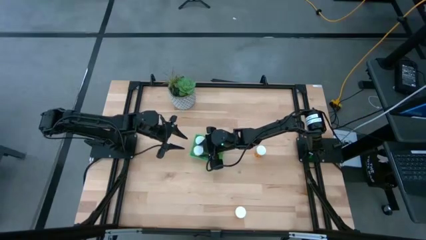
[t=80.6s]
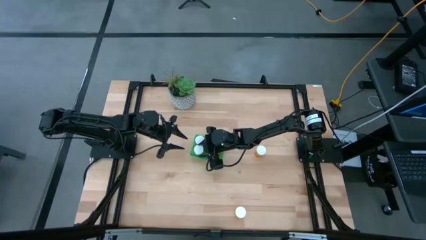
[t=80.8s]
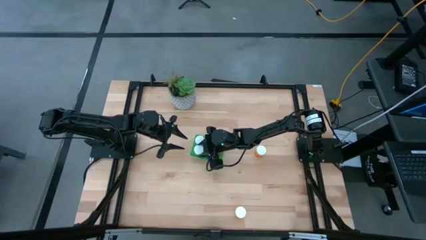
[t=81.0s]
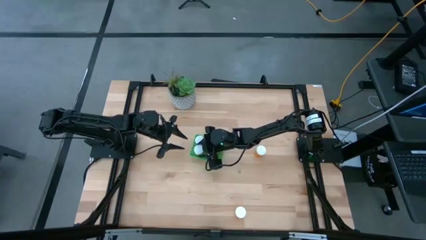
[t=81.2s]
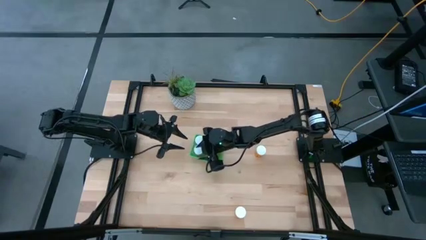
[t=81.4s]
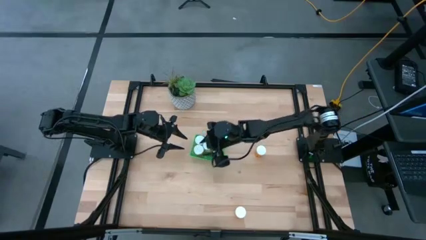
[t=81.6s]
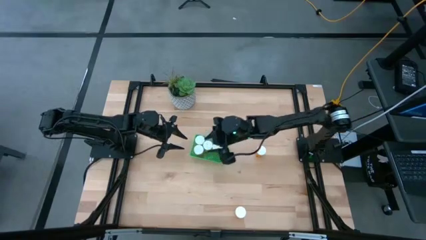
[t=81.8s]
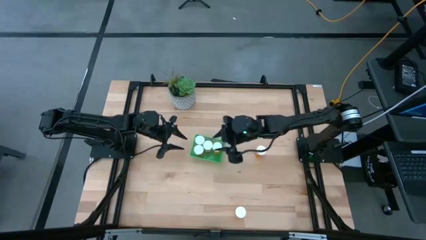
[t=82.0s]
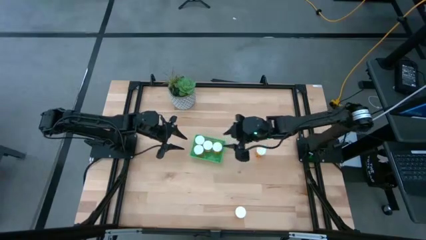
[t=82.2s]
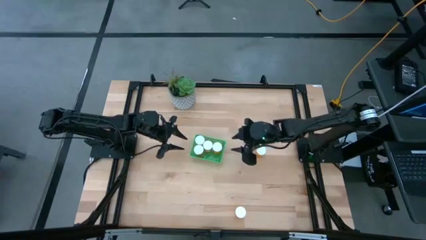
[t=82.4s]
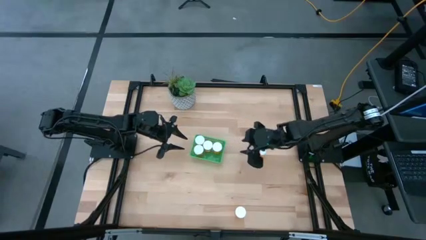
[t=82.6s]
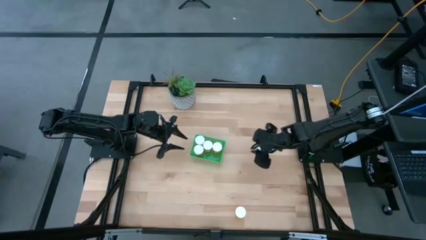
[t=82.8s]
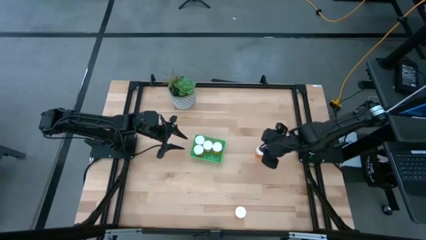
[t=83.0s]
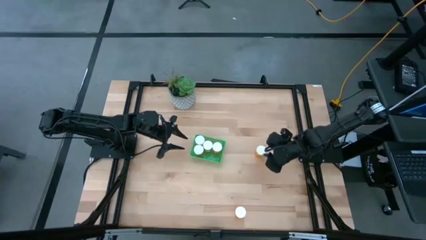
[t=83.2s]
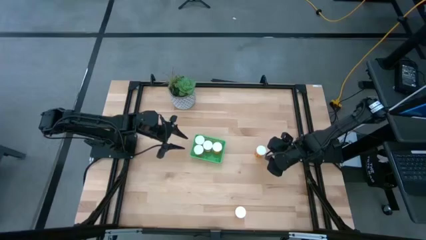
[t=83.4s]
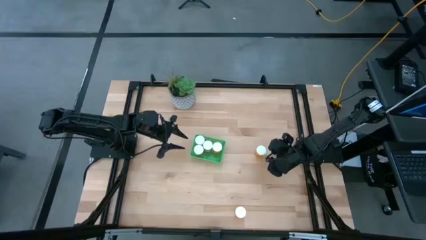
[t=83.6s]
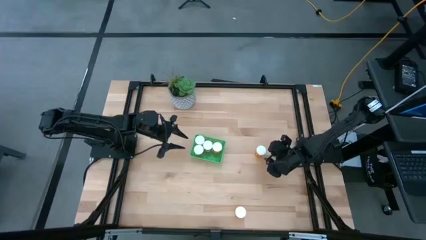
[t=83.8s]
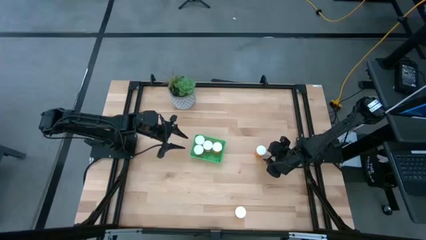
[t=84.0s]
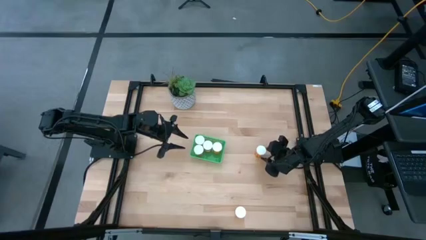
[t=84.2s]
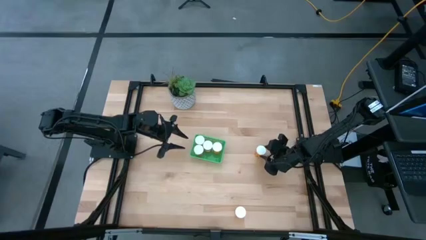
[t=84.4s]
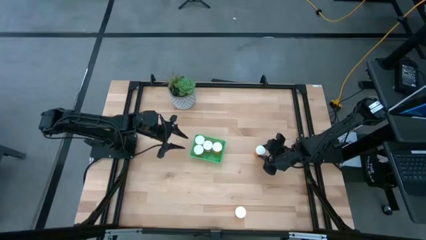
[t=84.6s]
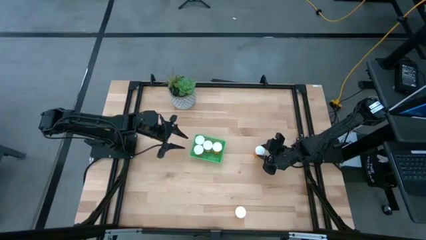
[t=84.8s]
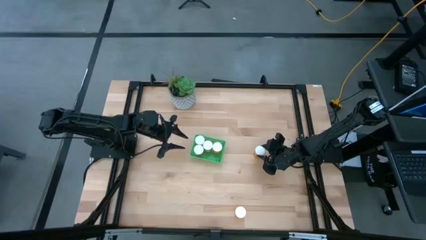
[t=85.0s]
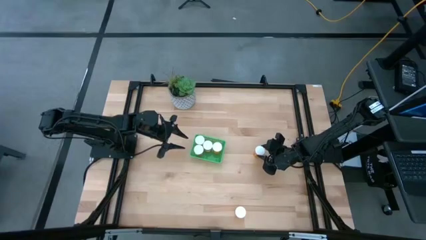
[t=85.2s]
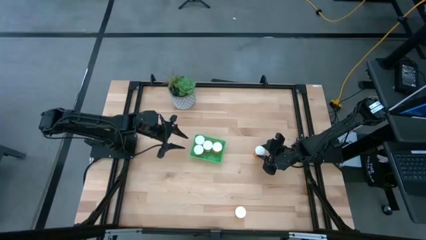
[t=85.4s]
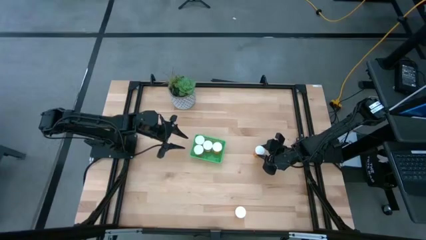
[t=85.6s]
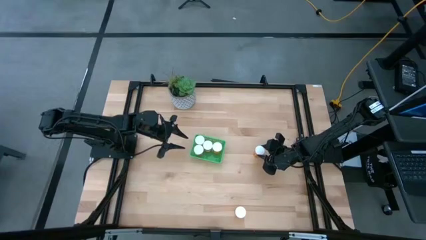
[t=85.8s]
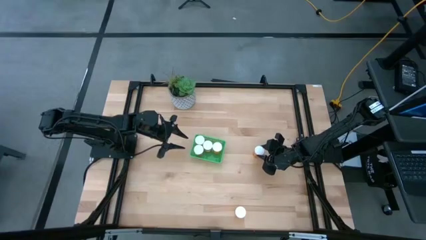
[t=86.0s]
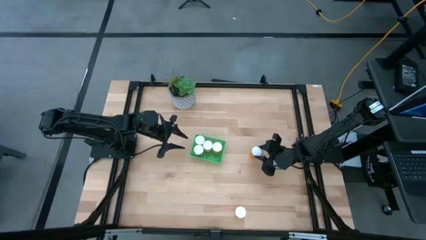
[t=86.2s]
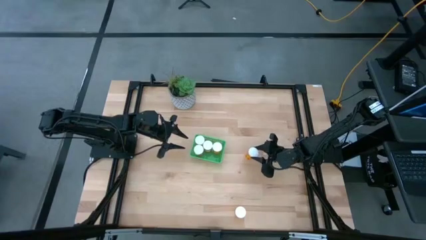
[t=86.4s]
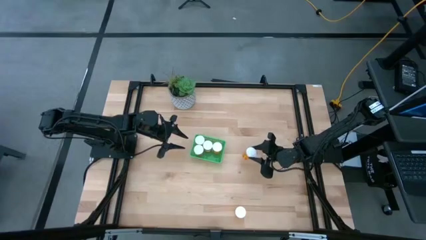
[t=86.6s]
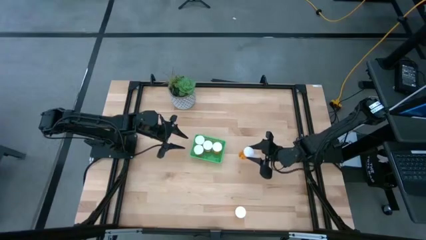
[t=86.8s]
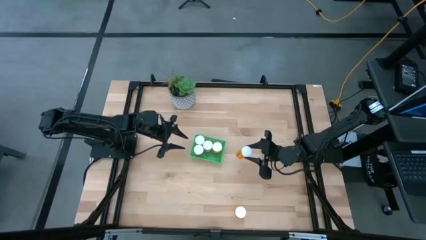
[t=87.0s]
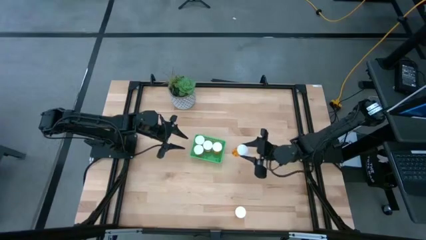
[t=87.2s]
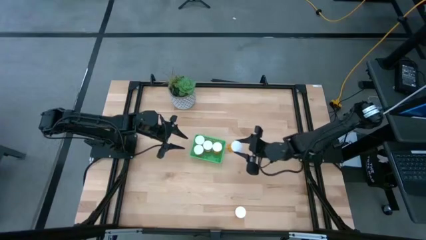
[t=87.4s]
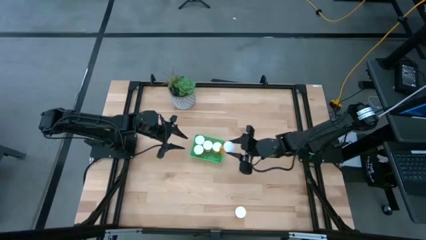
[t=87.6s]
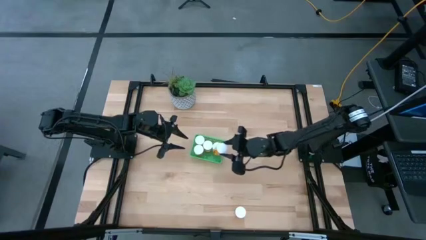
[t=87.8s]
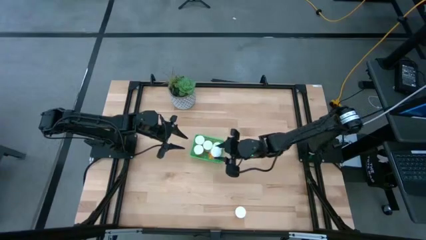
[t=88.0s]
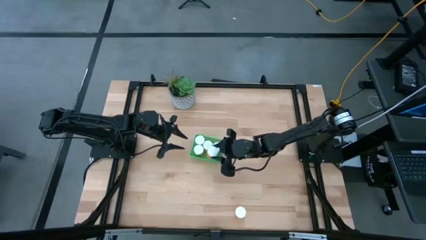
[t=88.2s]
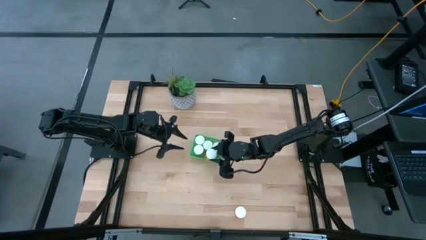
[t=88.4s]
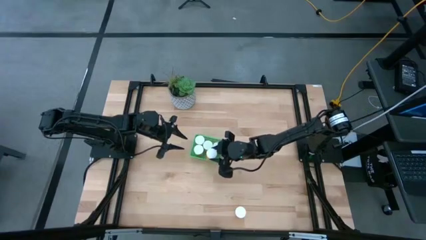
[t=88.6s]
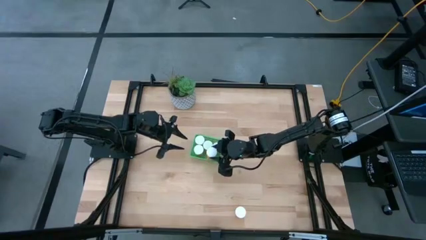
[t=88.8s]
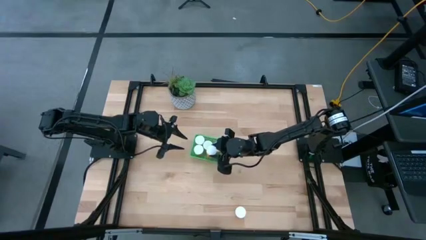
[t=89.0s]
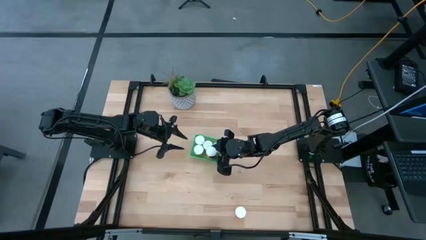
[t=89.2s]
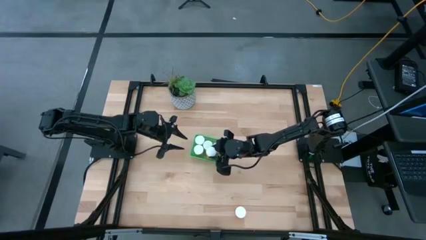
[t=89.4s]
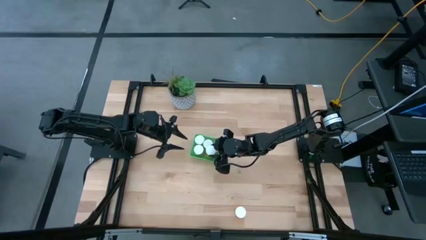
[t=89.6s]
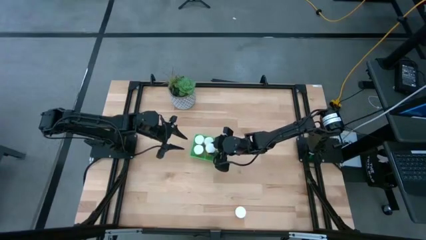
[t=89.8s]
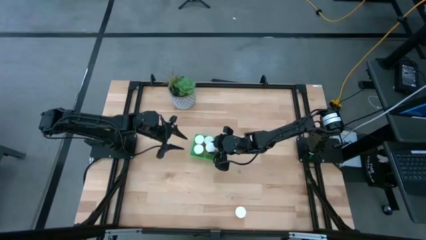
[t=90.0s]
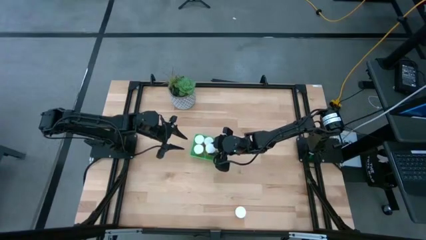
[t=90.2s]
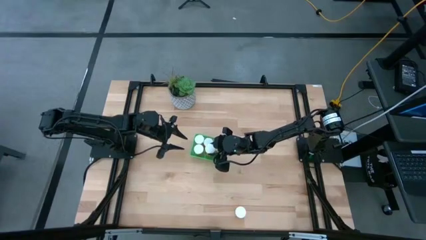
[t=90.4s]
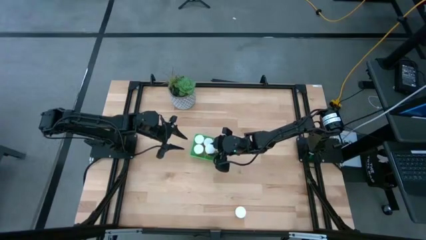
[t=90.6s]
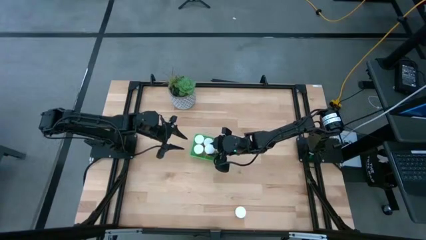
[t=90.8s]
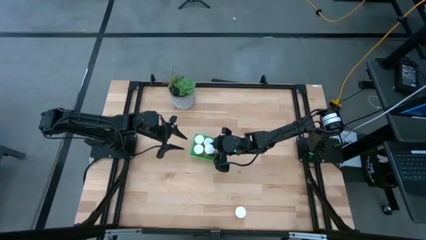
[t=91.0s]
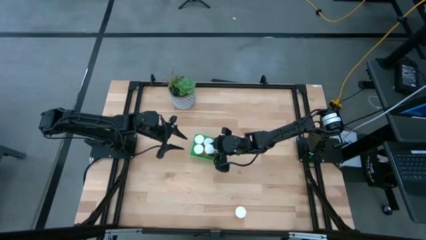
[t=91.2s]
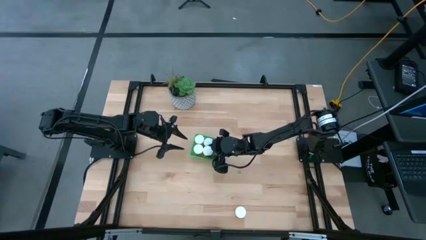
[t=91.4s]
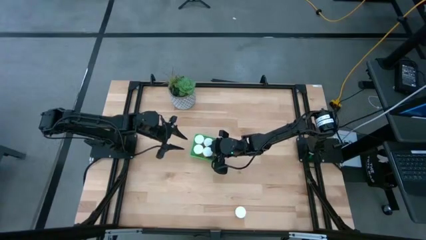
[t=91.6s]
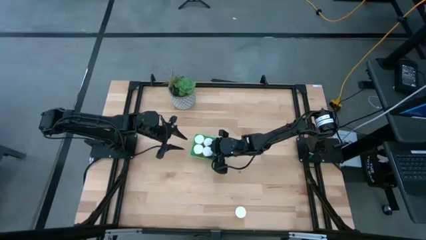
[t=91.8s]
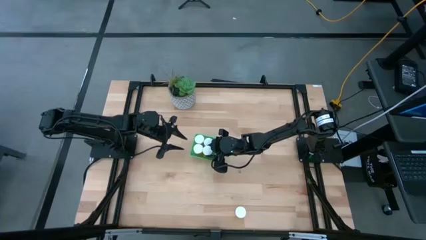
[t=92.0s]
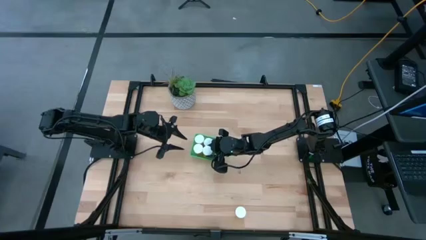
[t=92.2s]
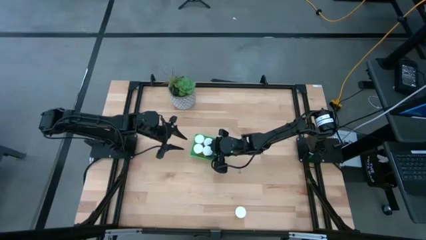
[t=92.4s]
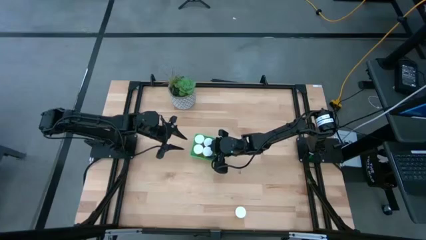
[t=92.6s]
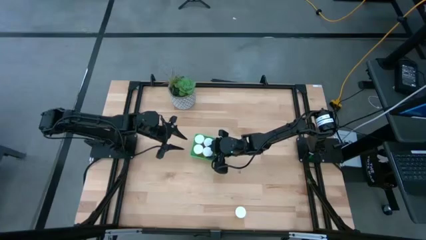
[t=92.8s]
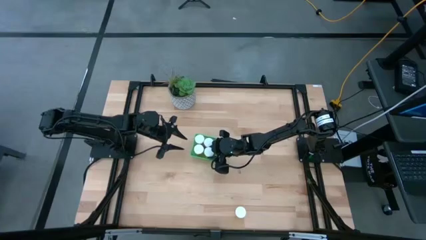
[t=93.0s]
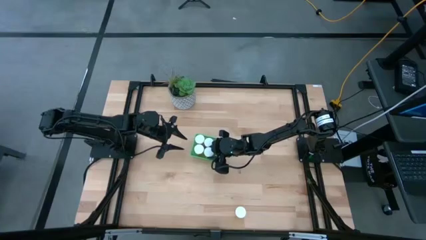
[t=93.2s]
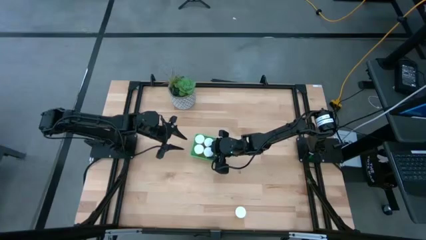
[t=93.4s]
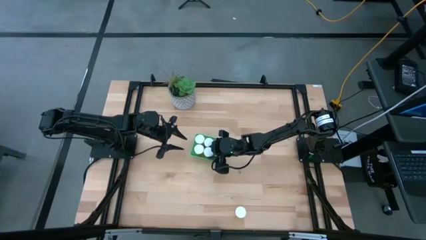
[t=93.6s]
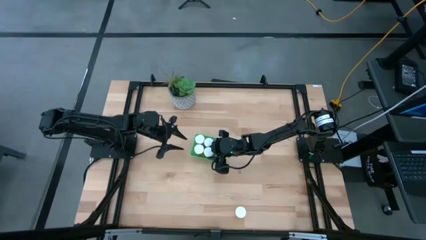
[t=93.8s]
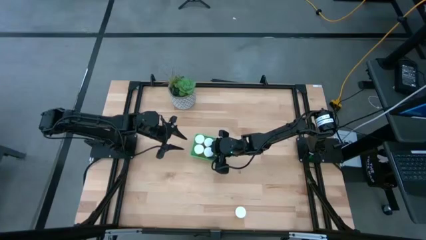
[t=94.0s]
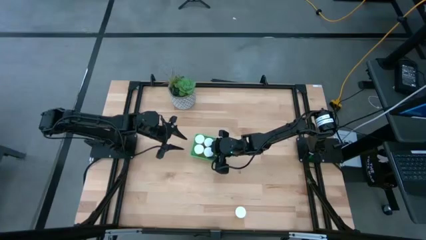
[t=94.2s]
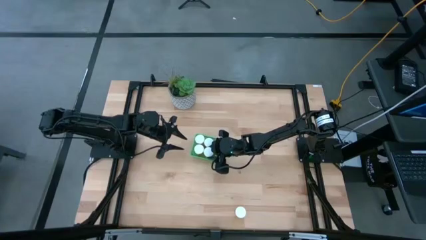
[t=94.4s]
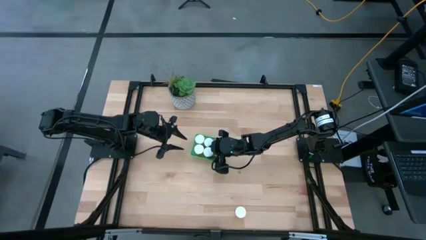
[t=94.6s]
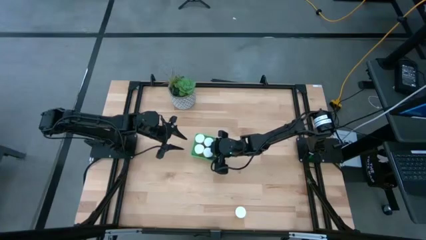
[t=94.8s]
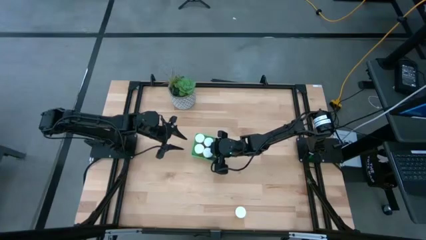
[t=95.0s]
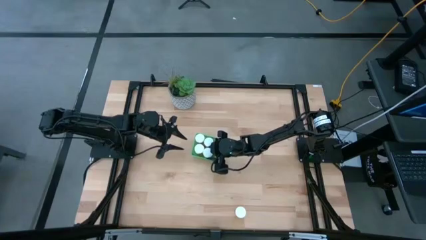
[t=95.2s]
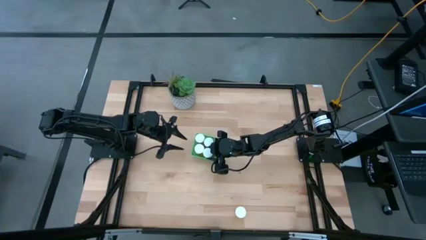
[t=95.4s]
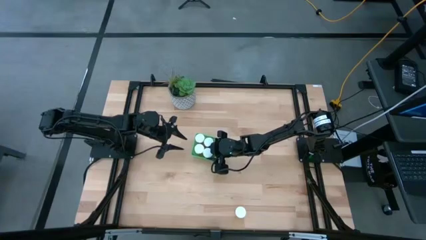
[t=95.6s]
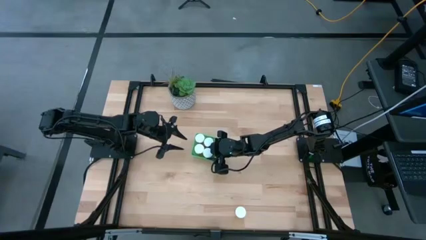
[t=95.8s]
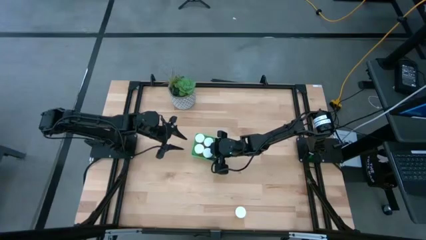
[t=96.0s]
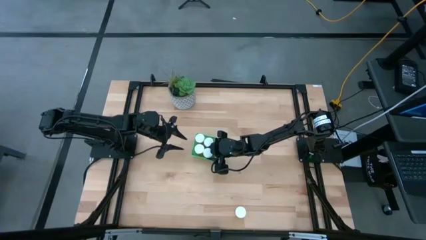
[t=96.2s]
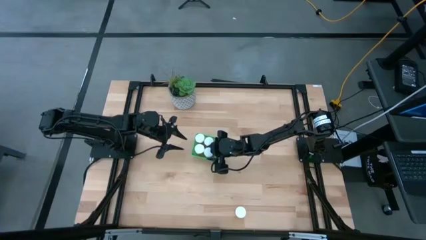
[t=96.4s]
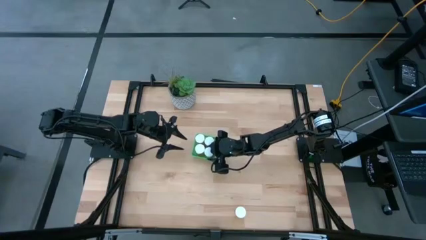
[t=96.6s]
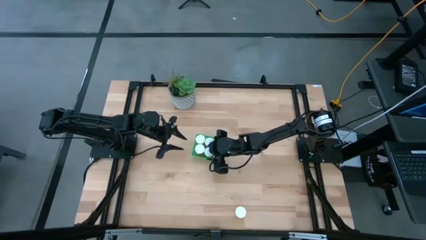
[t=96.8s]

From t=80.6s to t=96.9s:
Task: Pick and place pill bottles into a basket
Put the orange medicine bottle into the green bin
